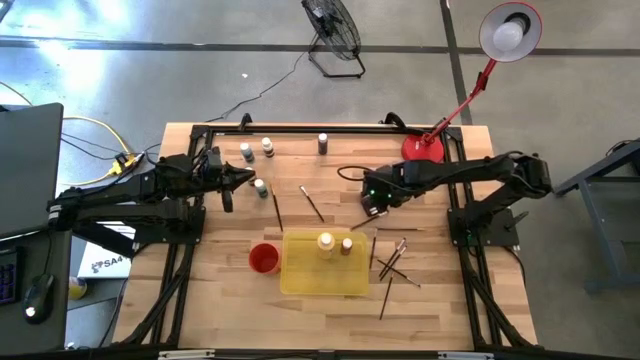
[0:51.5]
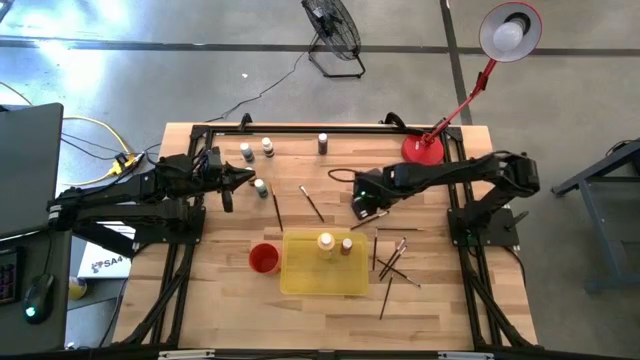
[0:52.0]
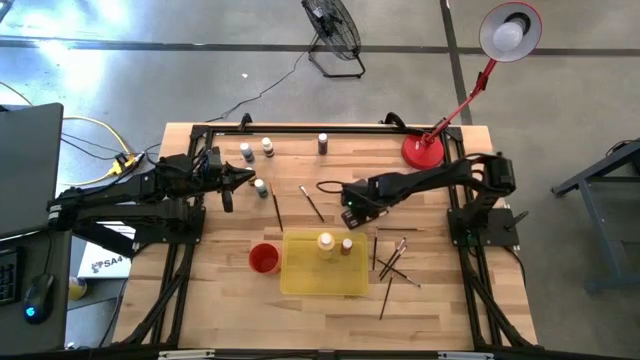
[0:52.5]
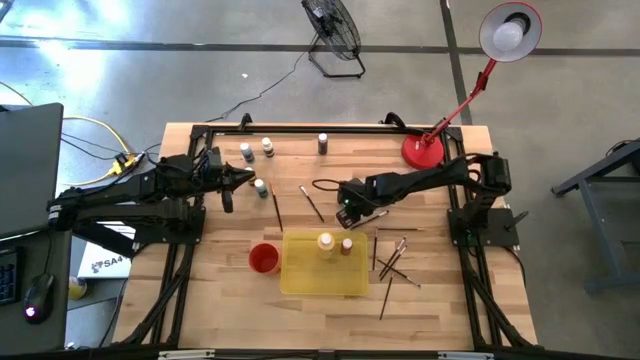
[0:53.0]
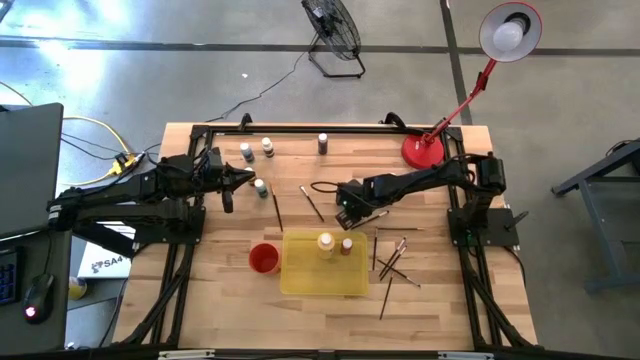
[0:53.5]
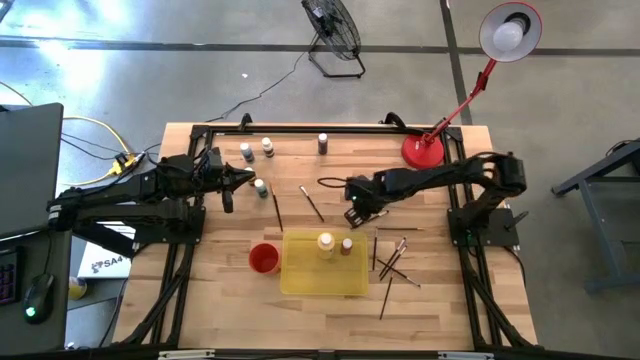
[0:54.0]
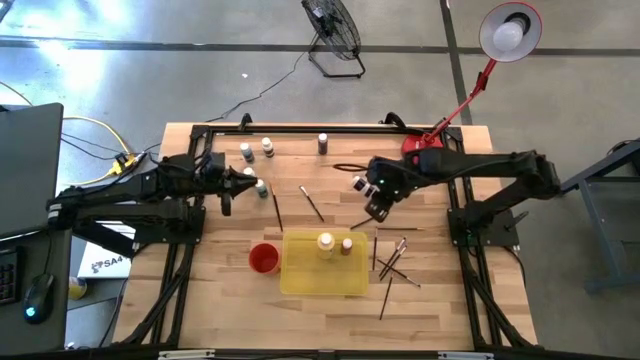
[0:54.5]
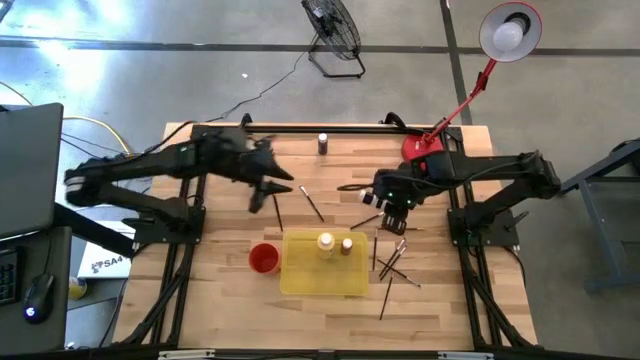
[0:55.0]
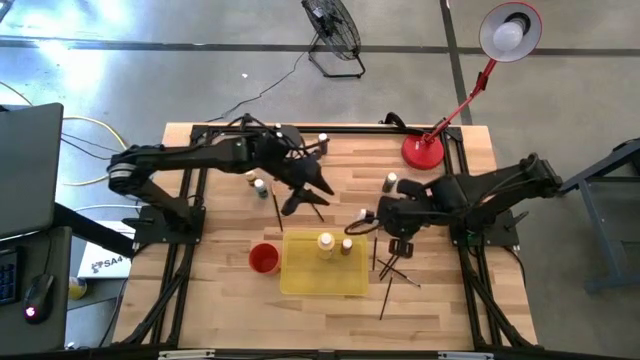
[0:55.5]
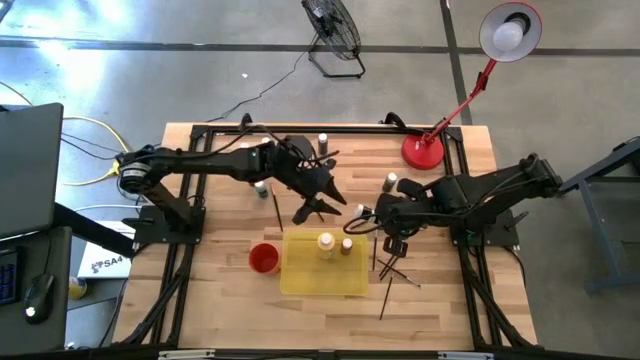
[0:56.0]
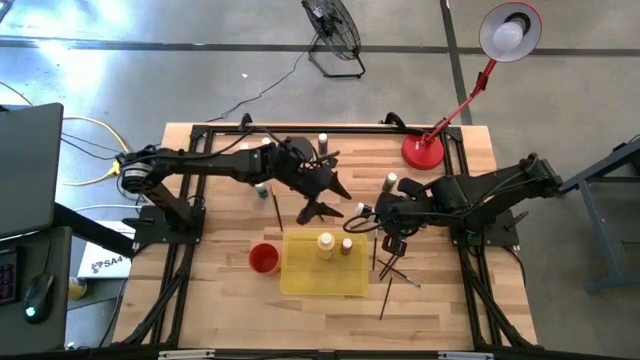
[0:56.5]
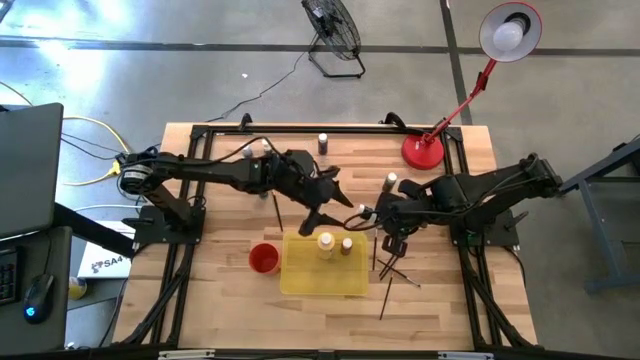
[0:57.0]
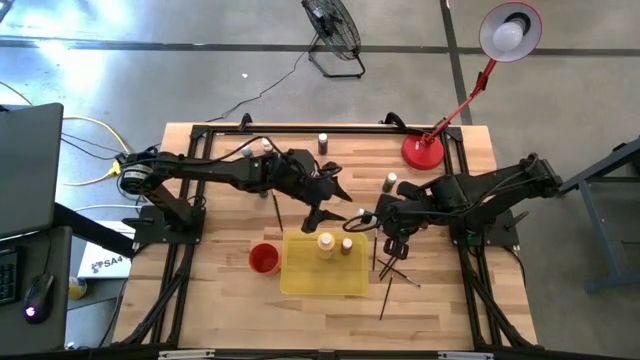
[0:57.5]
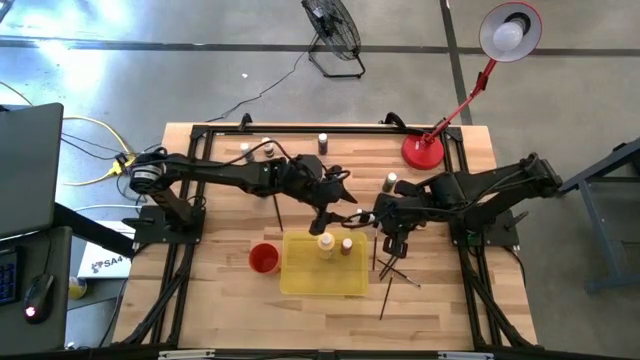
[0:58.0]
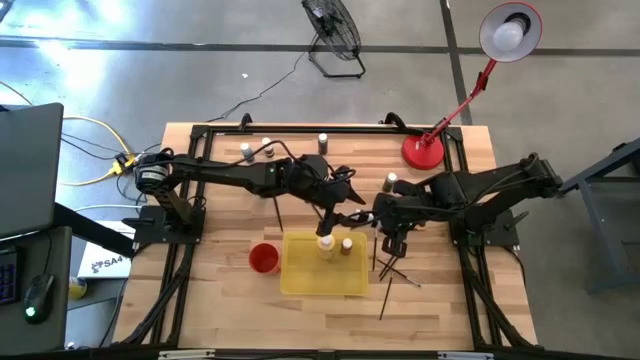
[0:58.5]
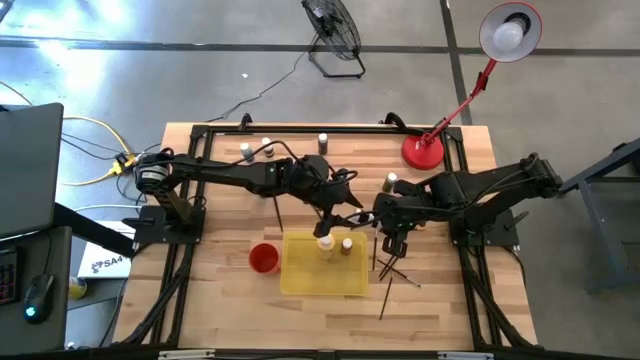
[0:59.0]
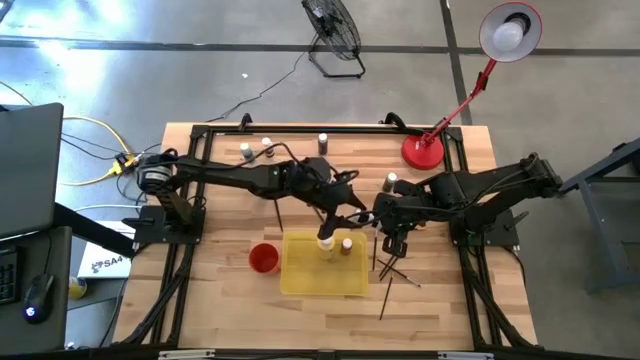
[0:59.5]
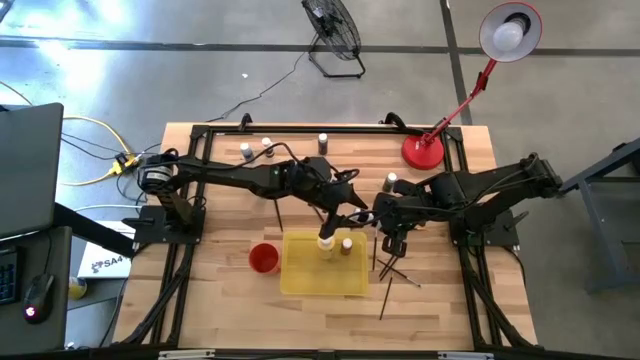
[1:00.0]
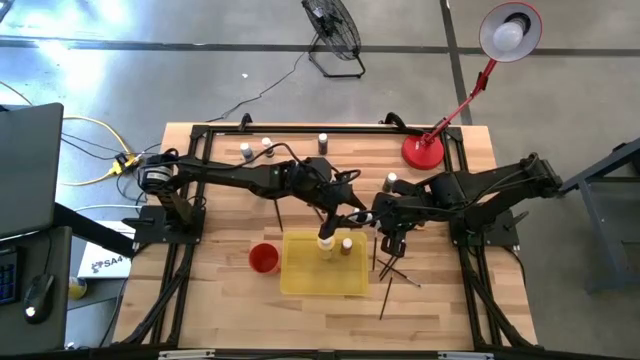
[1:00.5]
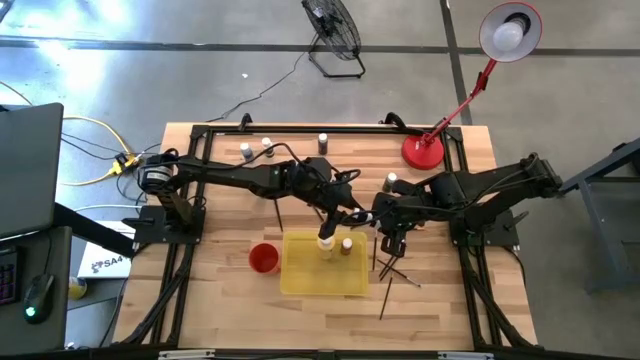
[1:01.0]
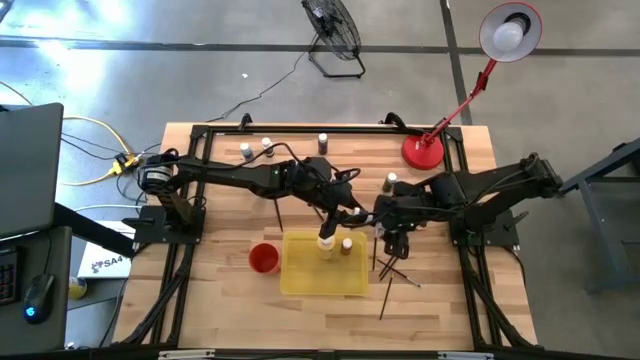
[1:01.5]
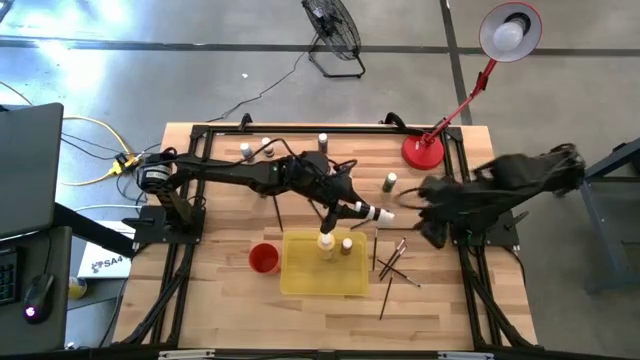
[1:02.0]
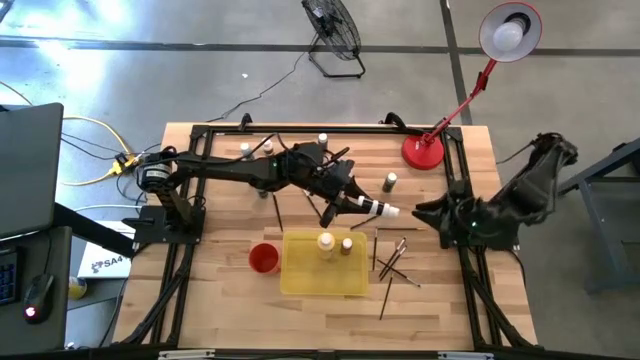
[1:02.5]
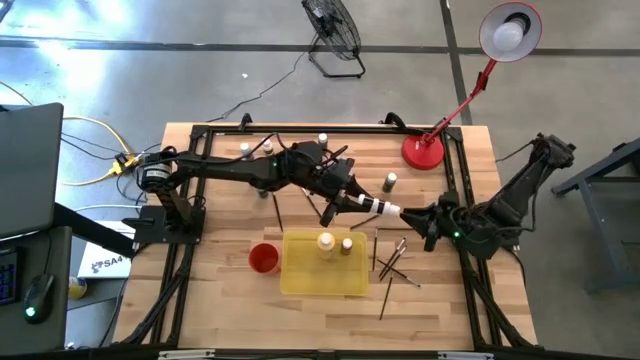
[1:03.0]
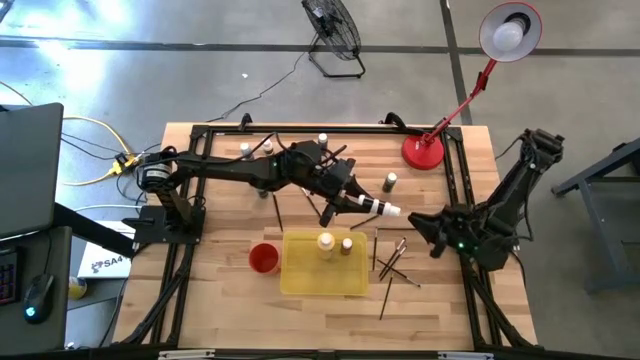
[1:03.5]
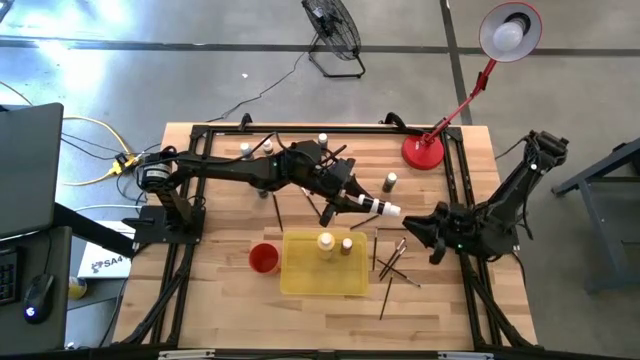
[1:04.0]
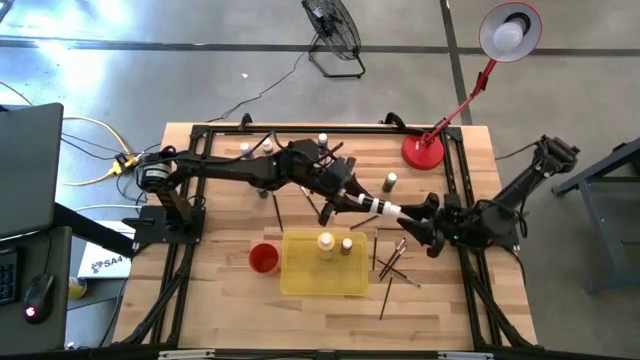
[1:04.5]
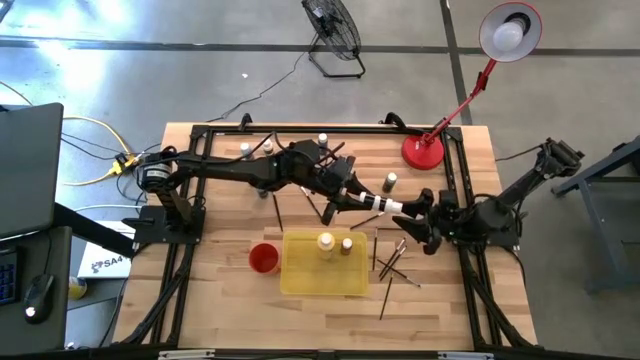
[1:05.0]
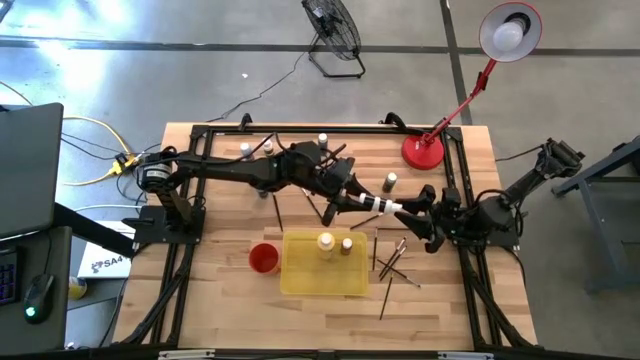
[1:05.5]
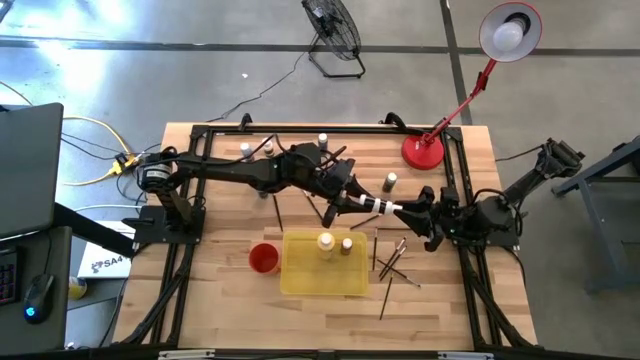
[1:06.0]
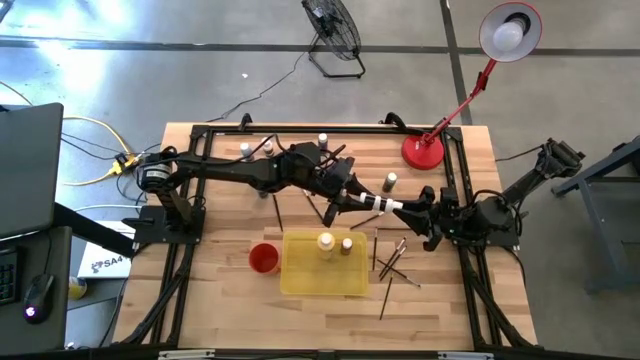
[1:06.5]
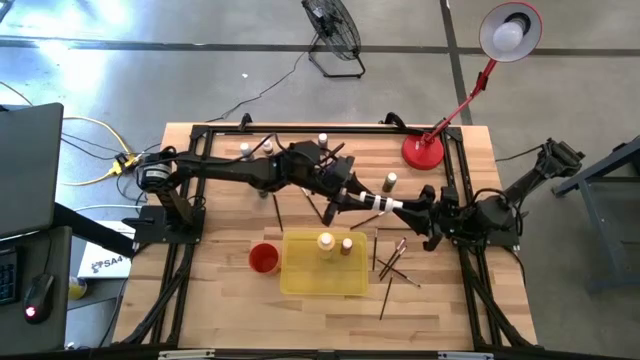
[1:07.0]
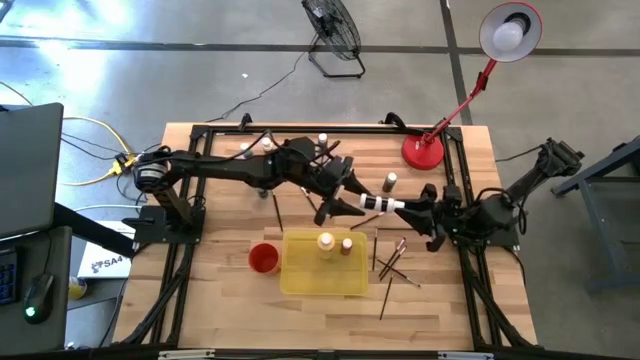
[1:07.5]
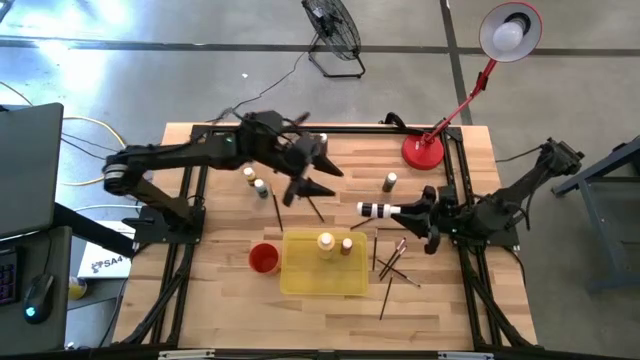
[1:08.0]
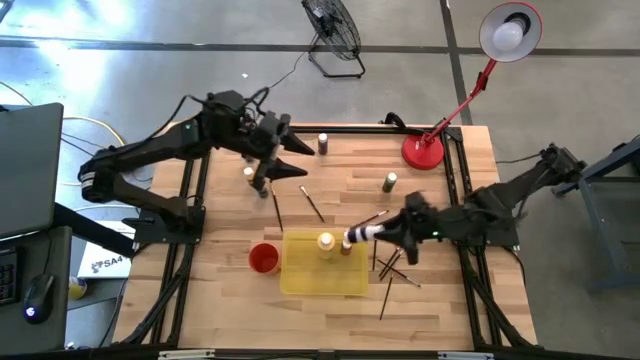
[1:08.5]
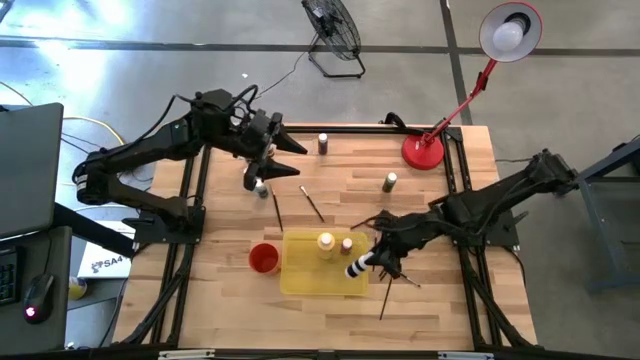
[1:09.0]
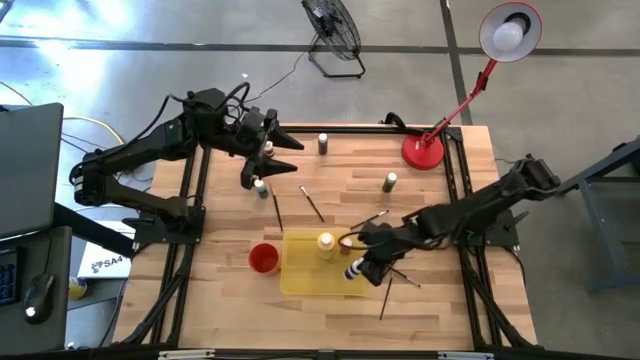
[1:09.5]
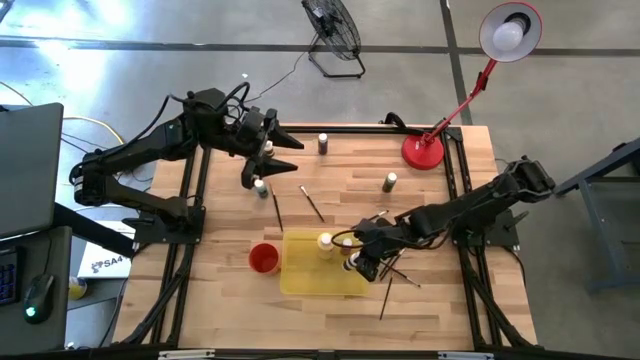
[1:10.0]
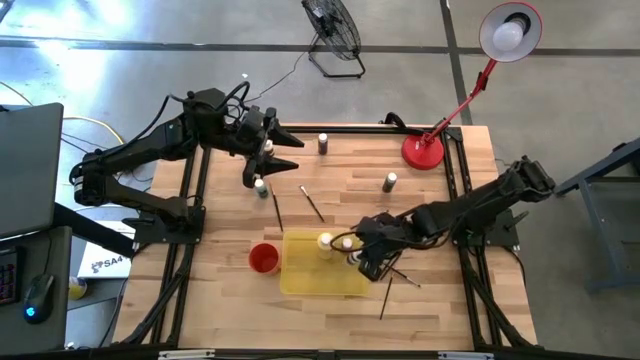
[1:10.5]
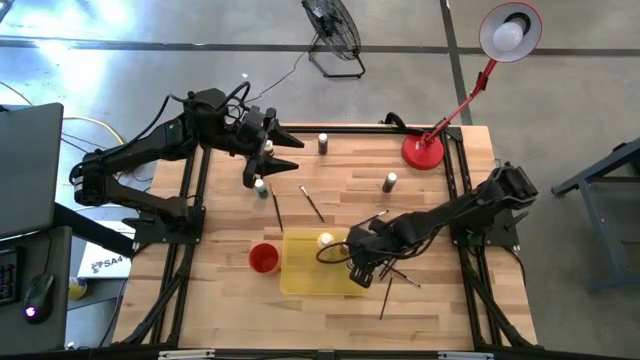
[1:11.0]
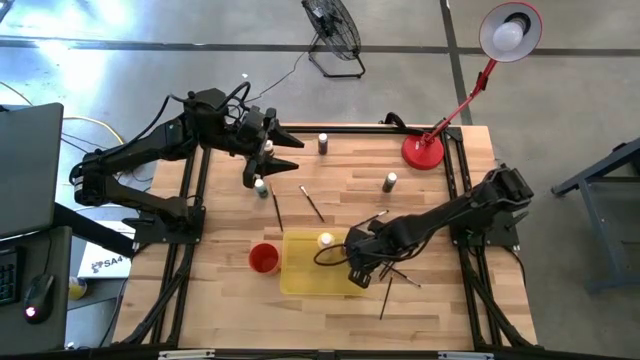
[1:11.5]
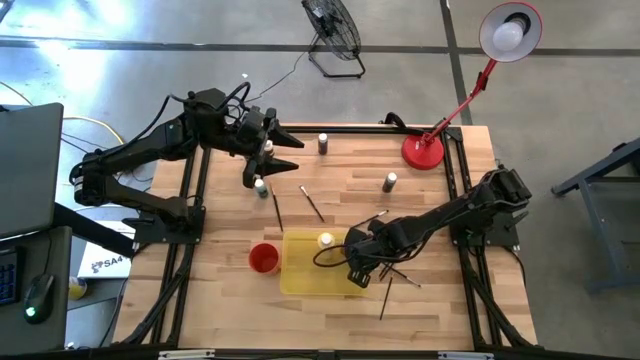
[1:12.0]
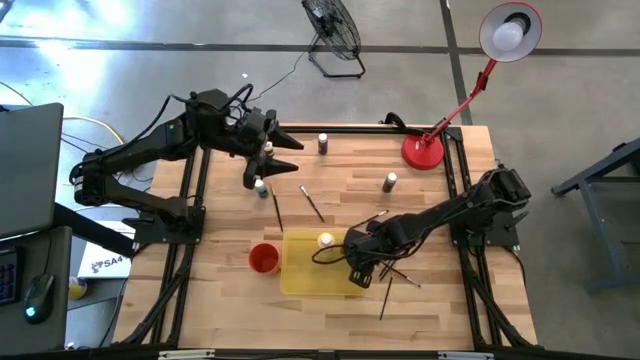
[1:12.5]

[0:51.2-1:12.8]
Task: Pick & Place Paint Supplies
Put the white paint bottle into the yellow bin
